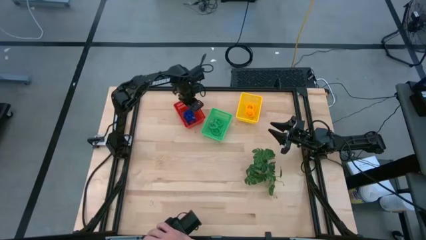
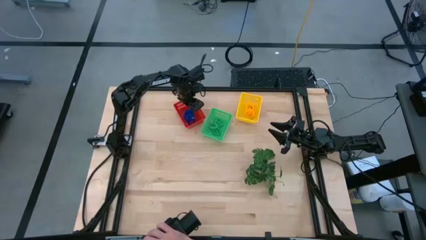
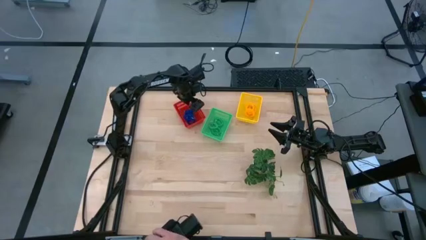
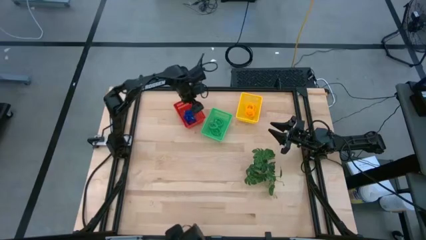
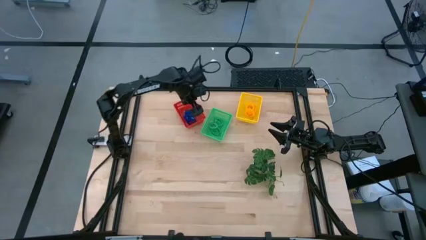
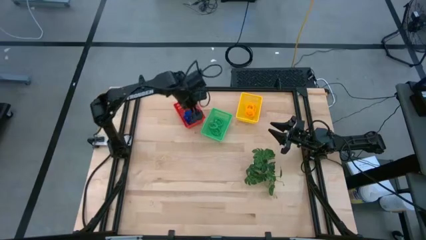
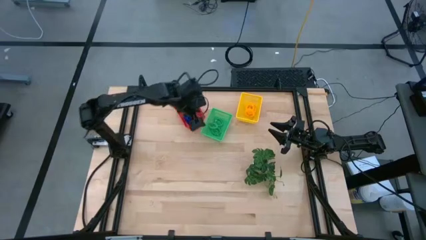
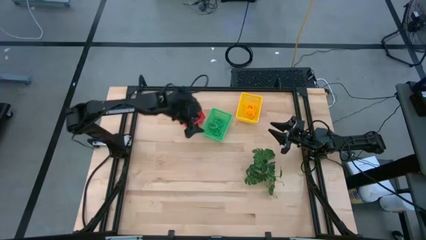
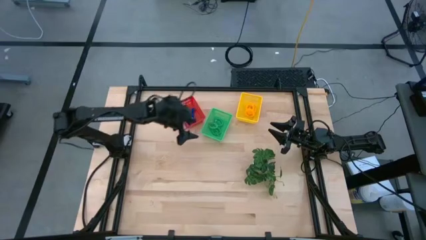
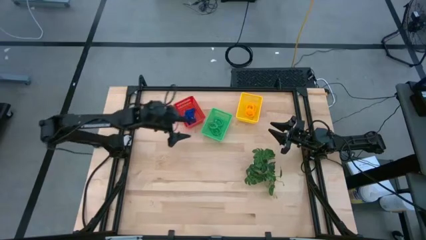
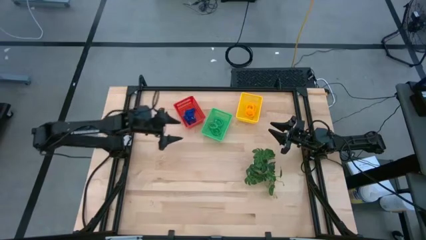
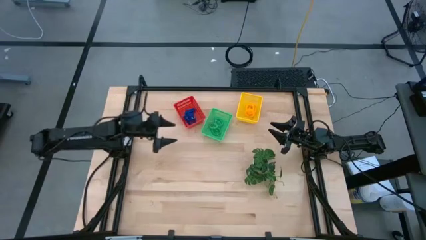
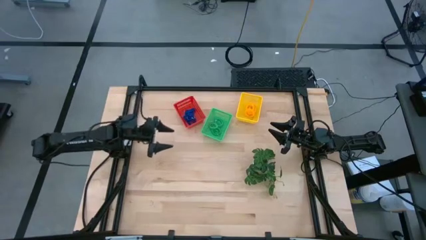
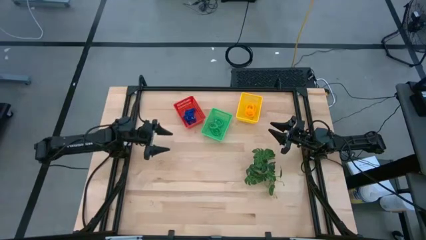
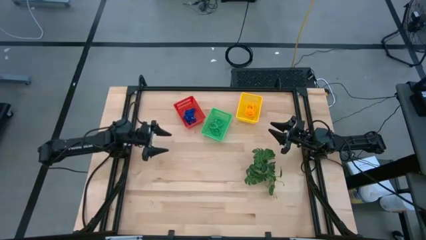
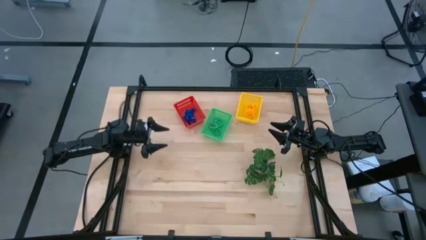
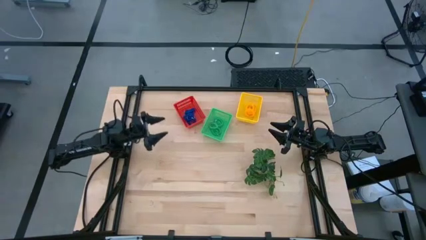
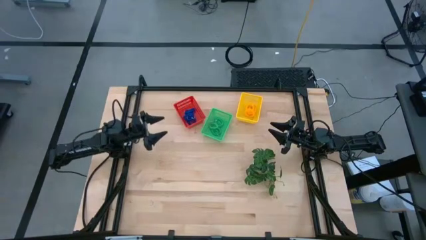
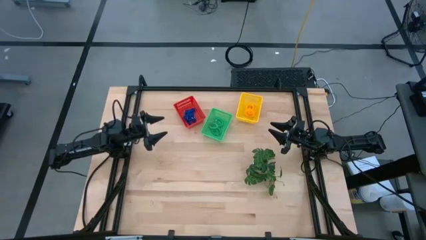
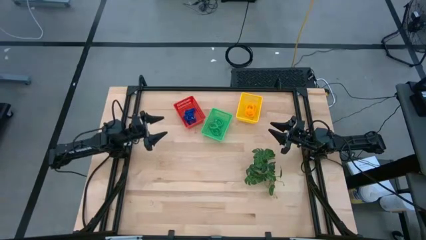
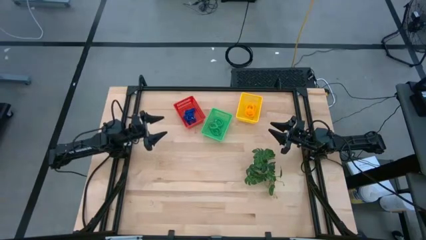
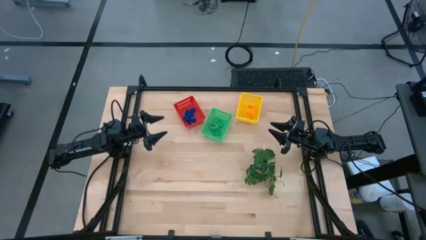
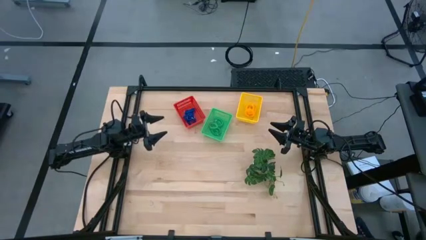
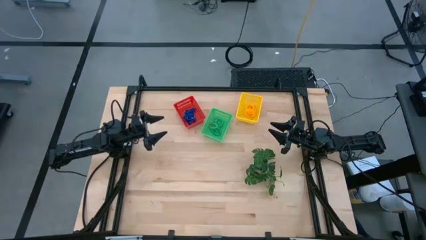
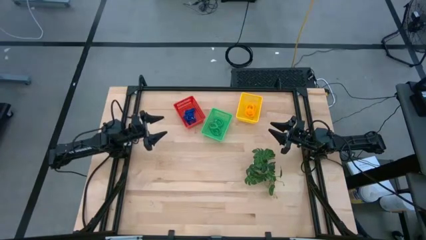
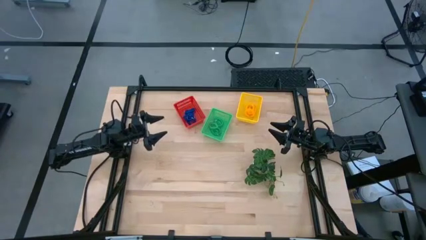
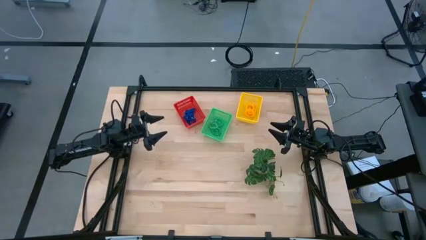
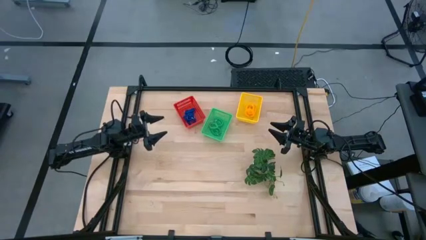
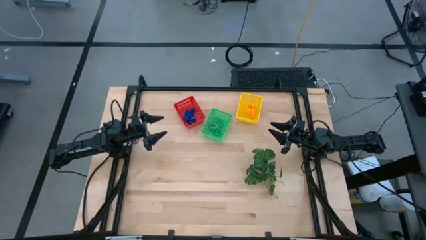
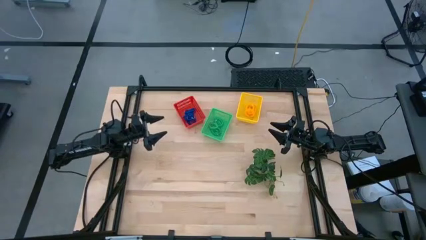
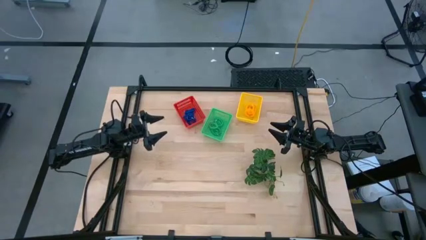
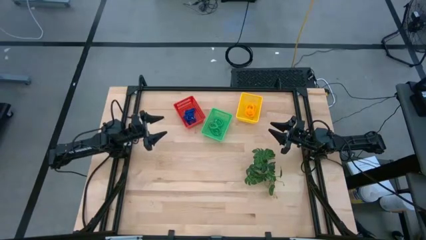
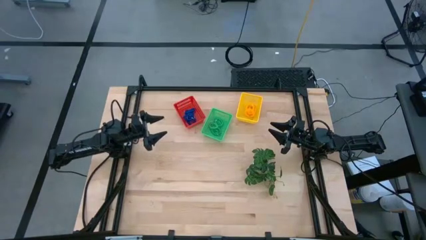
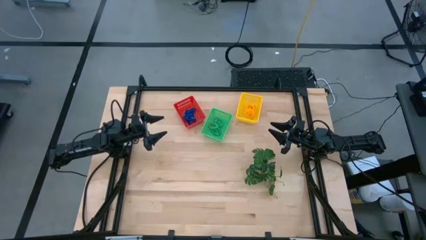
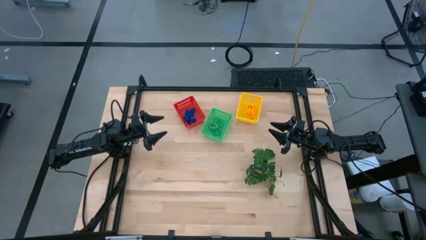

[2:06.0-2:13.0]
Task: Sort spring keychains
Return to Home Position

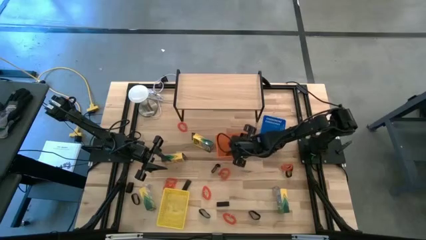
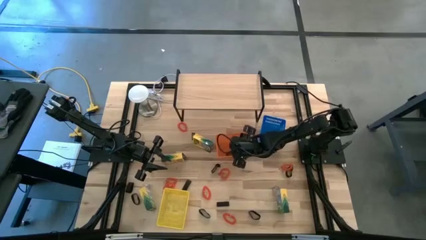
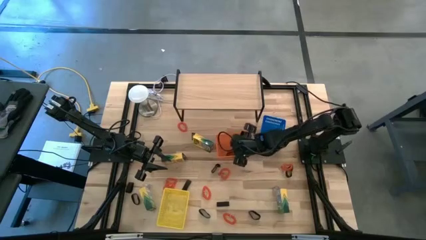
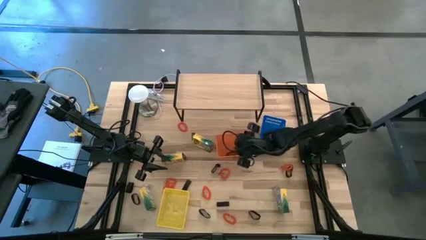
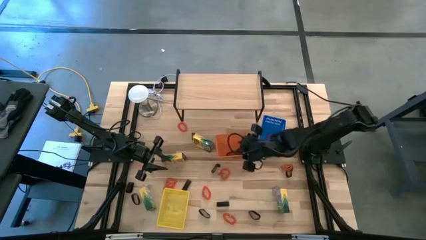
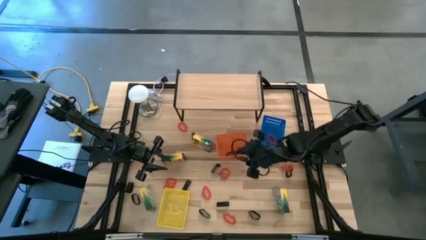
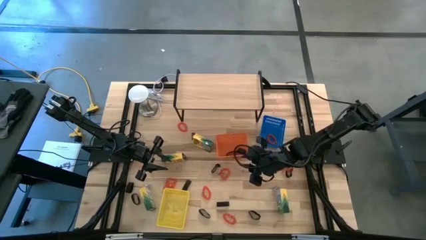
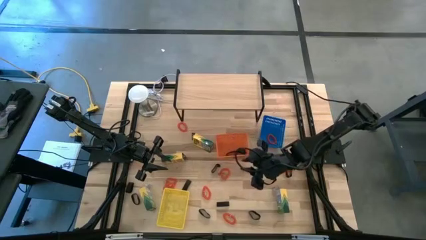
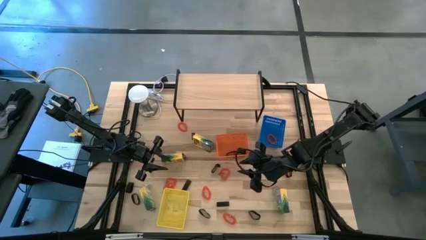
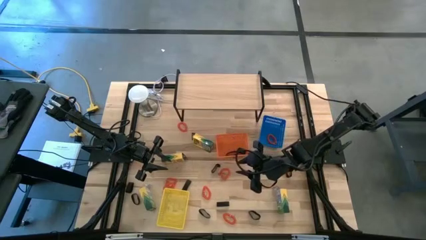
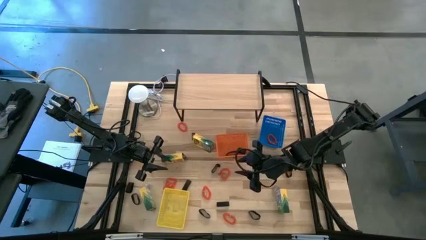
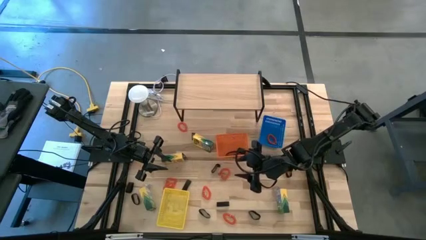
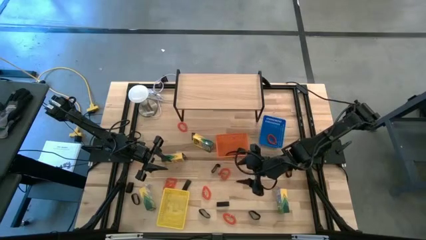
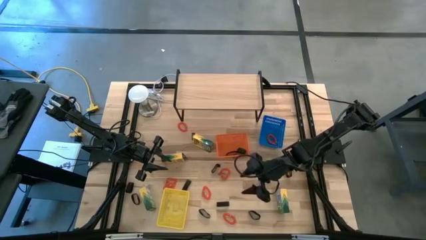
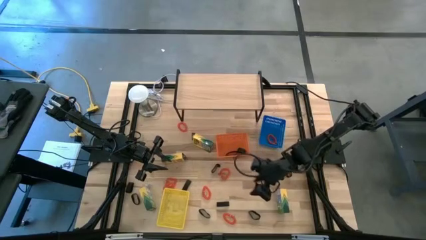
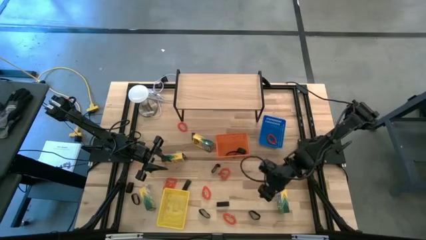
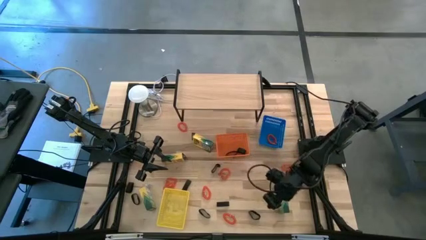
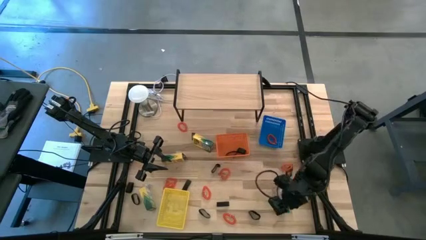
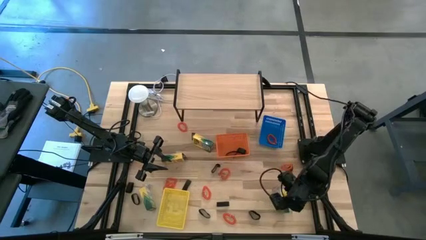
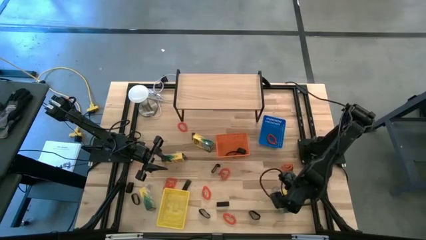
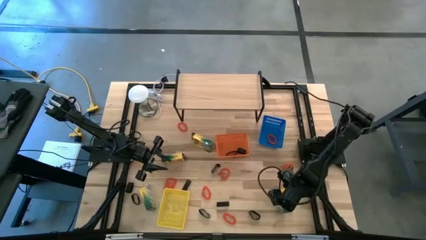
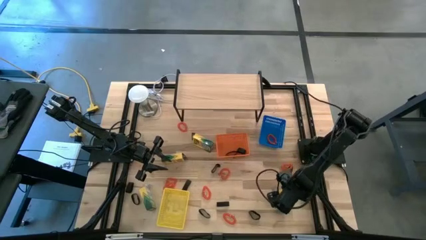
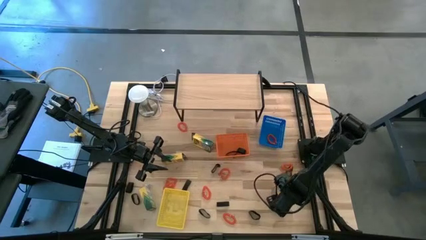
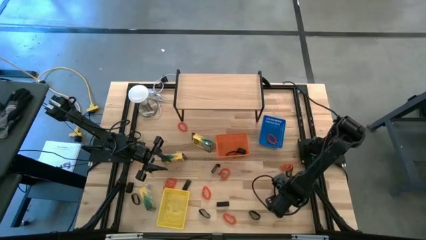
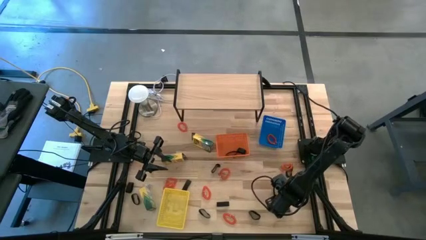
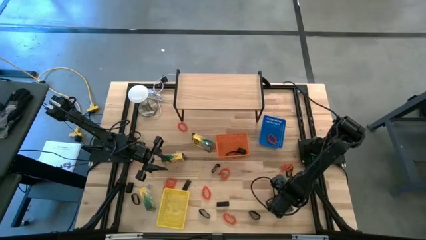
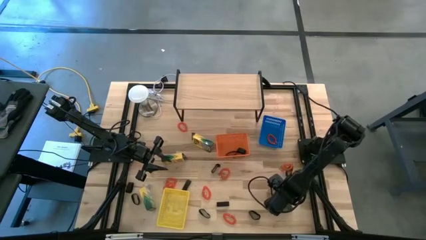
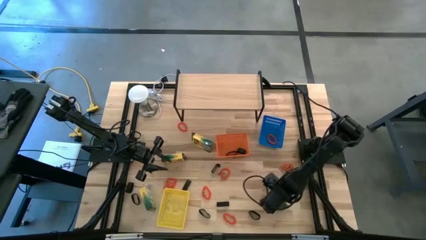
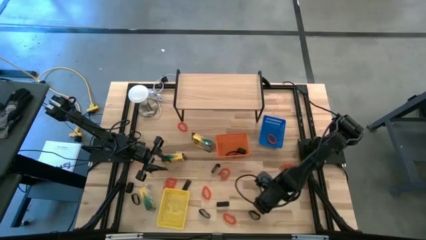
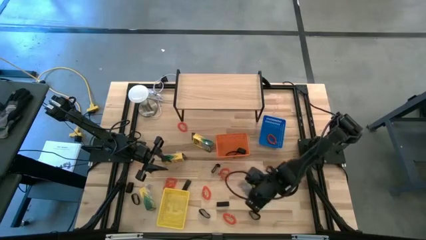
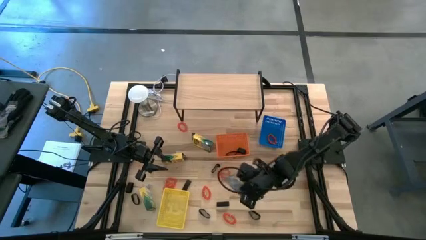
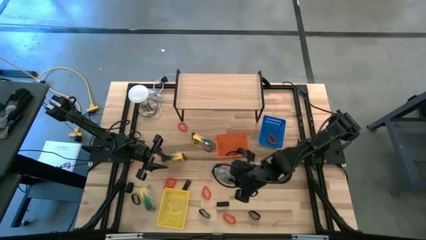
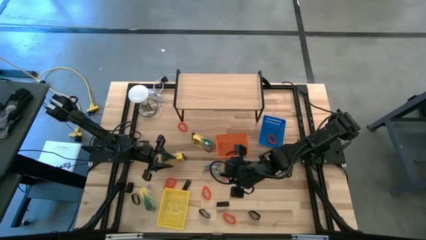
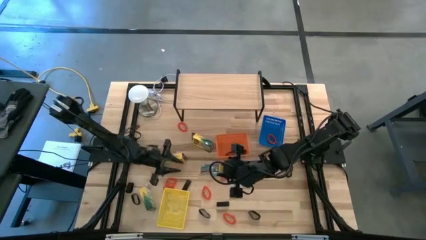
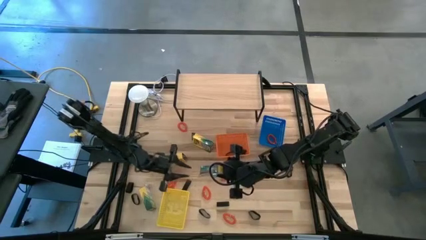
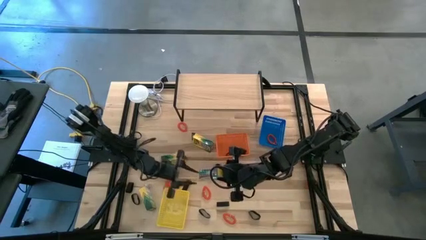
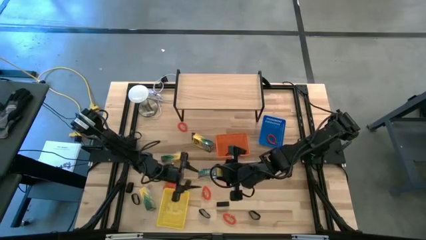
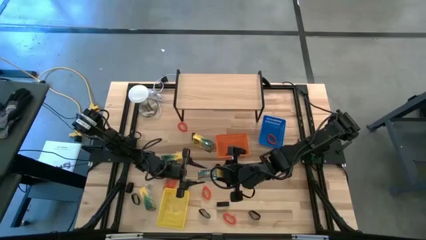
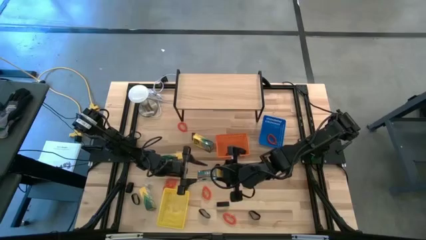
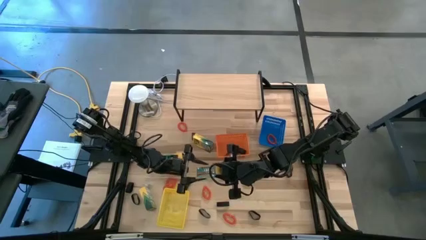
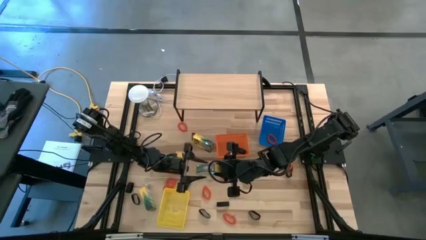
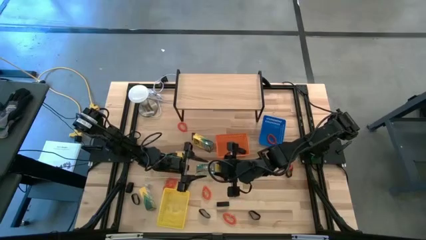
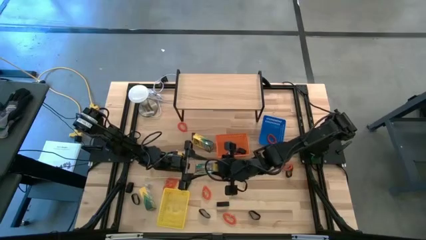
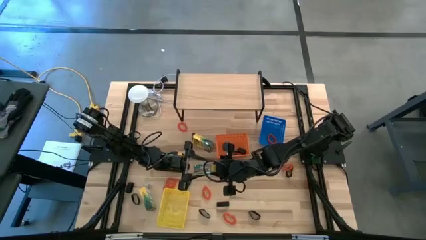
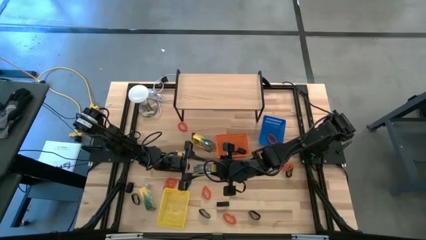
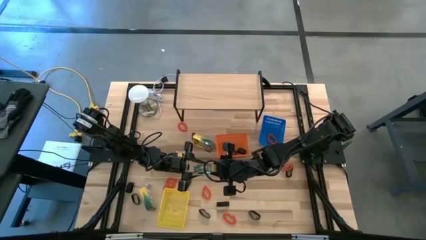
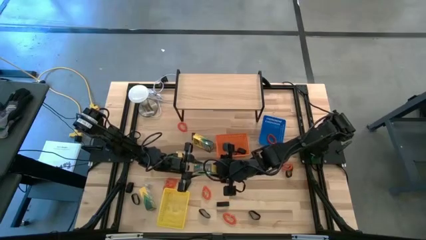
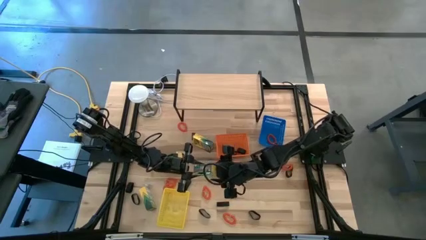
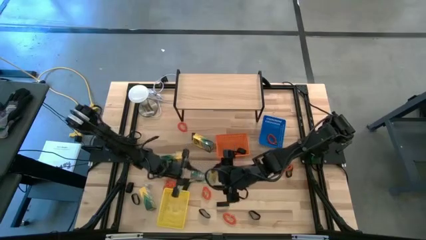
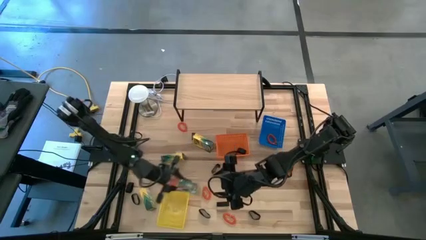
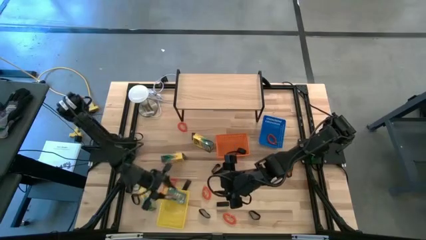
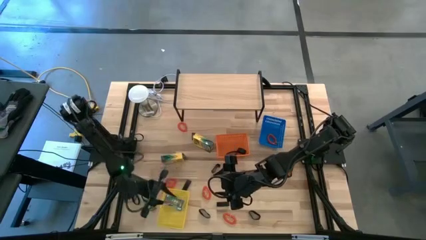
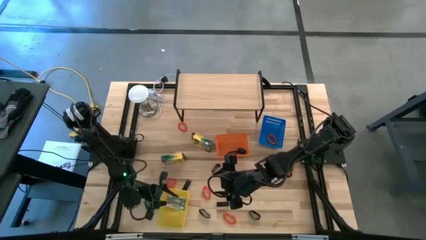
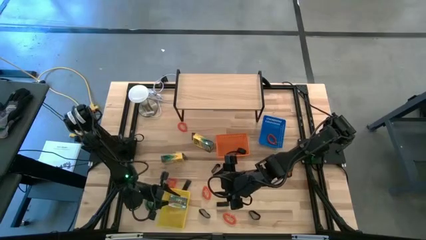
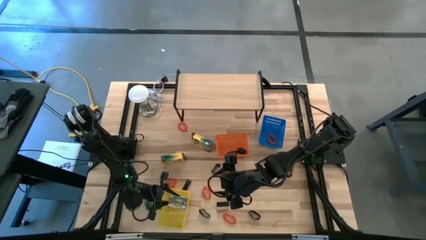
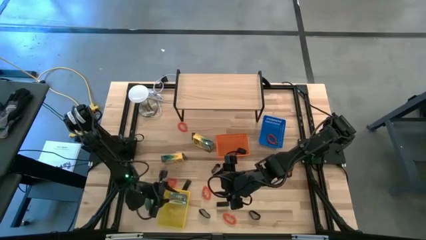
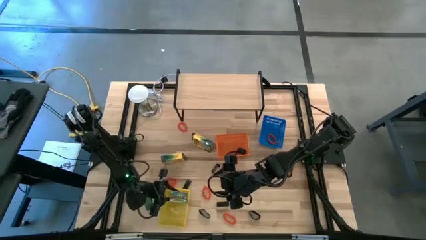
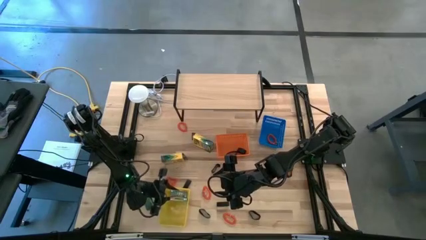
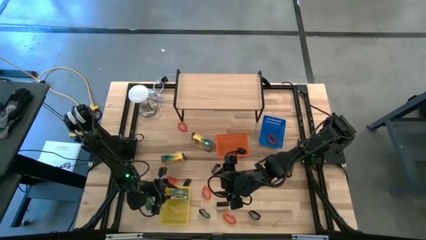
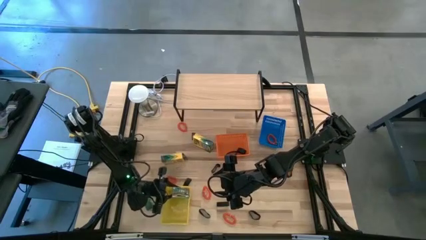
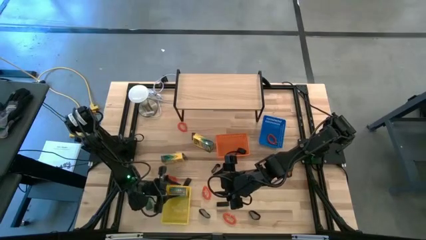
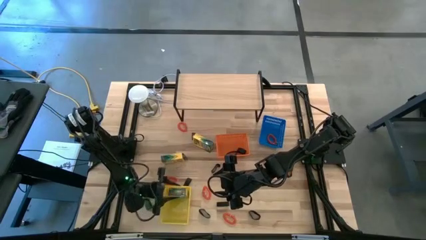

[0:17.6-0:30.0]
Task: Pick & Place Office Desk Supplies
Put the crayon box into the yellow bin
